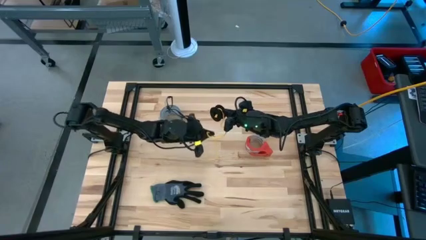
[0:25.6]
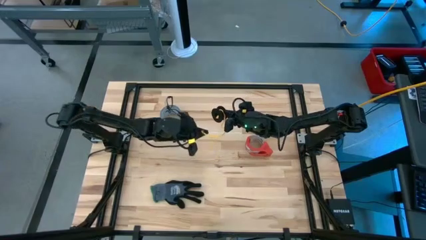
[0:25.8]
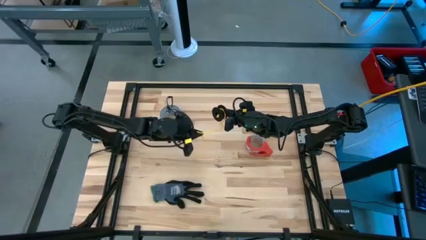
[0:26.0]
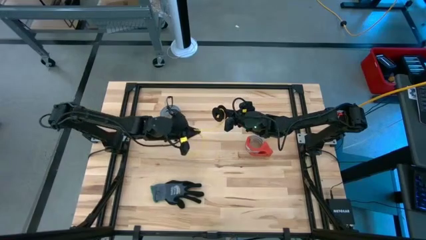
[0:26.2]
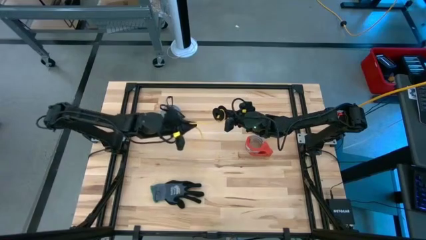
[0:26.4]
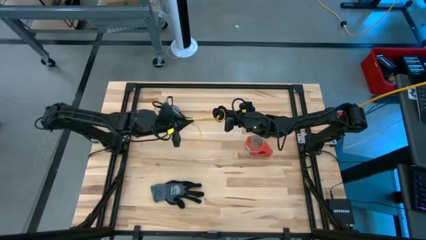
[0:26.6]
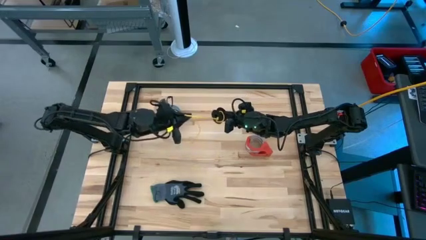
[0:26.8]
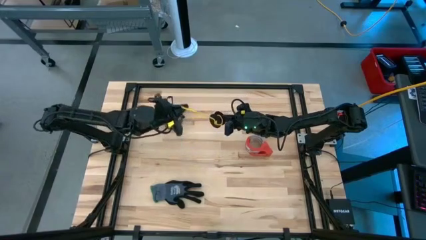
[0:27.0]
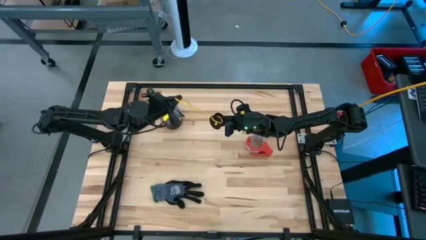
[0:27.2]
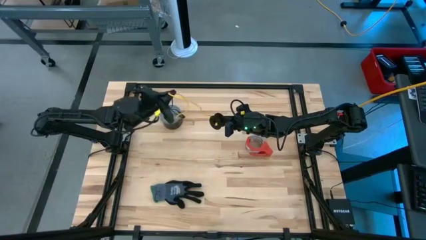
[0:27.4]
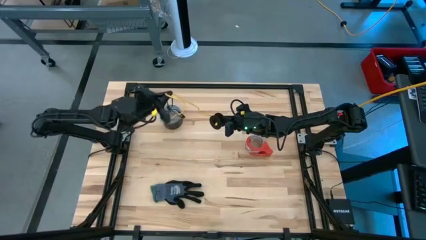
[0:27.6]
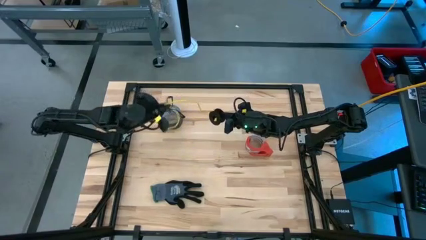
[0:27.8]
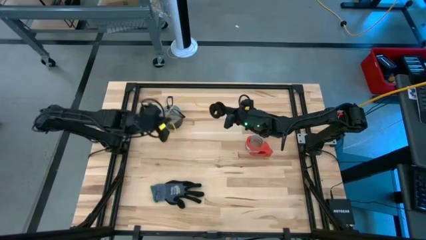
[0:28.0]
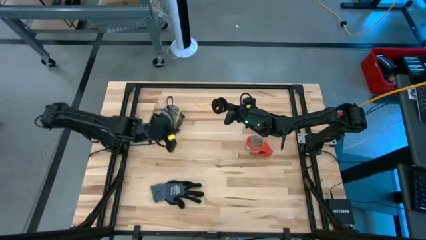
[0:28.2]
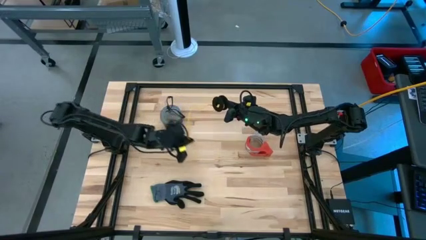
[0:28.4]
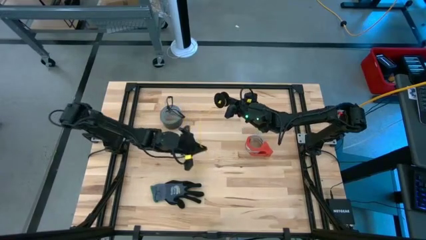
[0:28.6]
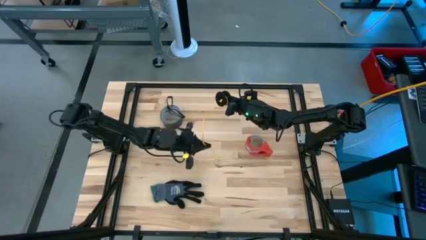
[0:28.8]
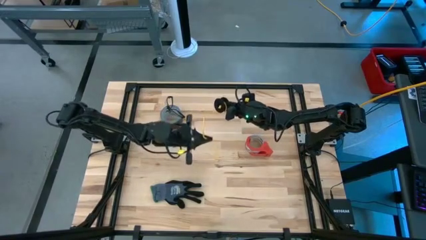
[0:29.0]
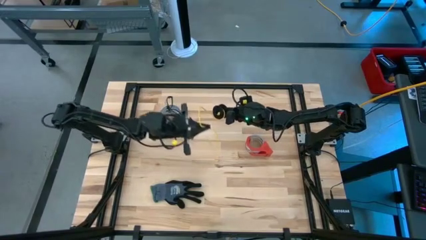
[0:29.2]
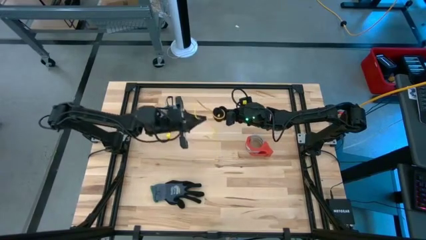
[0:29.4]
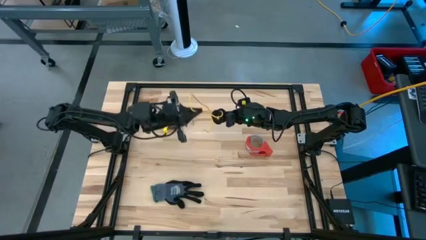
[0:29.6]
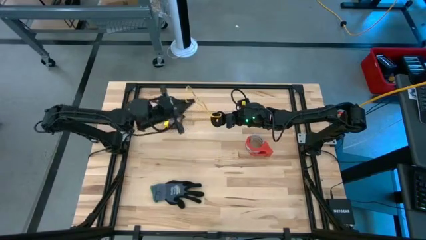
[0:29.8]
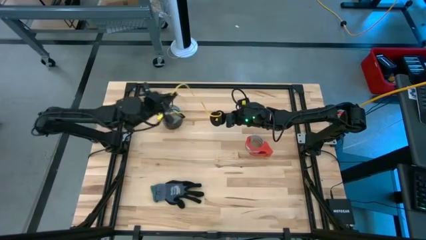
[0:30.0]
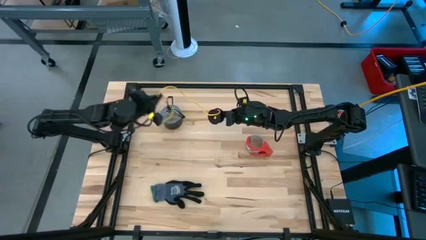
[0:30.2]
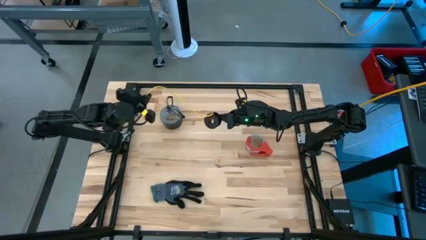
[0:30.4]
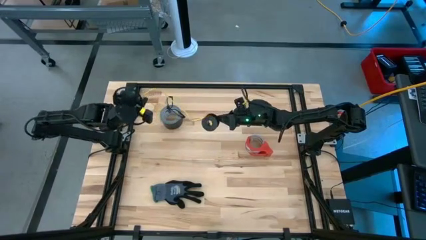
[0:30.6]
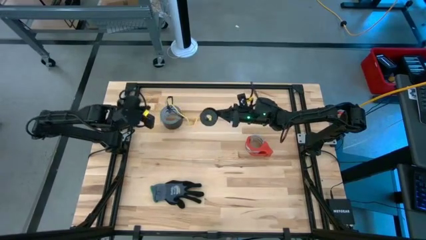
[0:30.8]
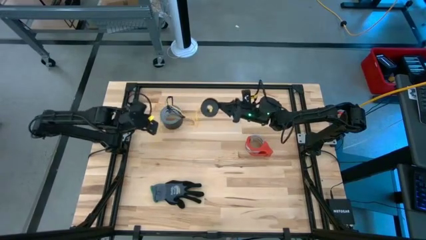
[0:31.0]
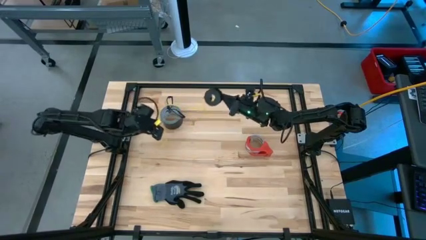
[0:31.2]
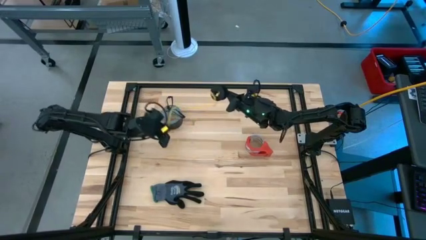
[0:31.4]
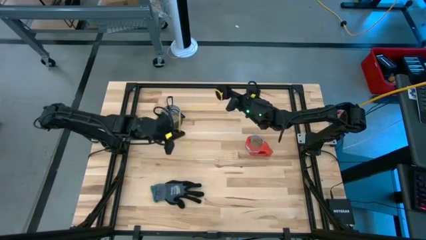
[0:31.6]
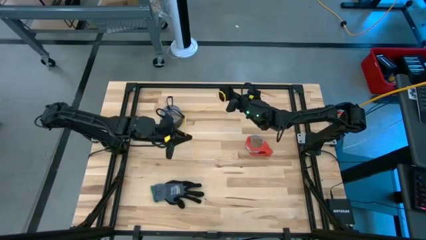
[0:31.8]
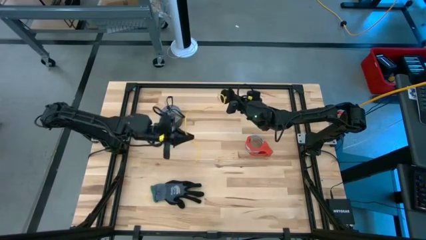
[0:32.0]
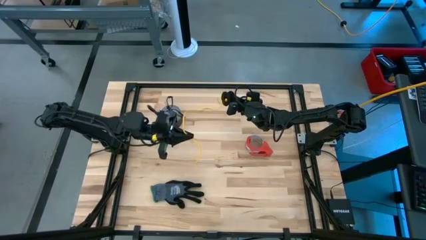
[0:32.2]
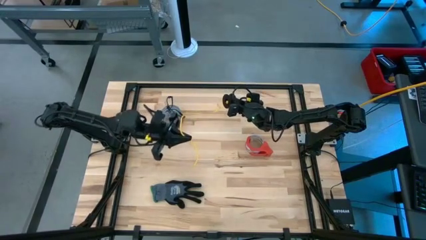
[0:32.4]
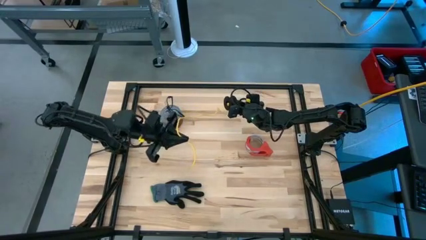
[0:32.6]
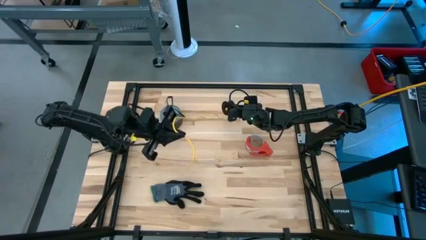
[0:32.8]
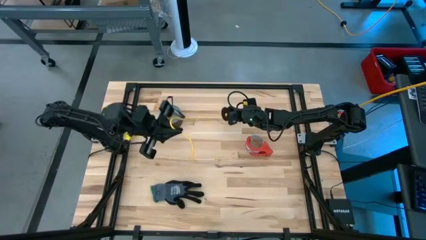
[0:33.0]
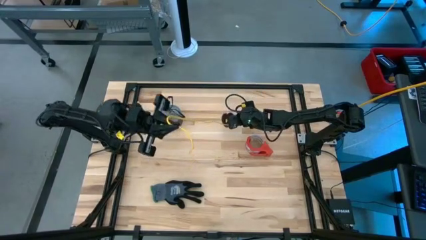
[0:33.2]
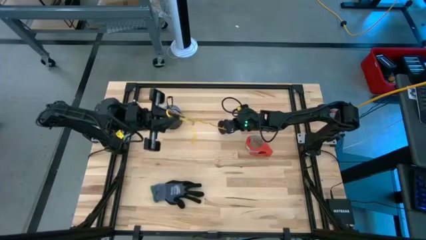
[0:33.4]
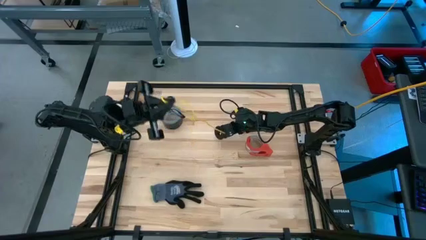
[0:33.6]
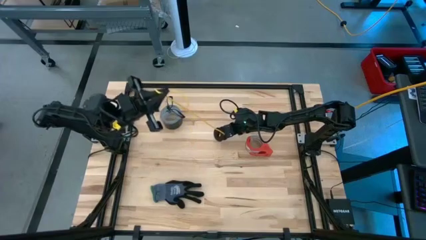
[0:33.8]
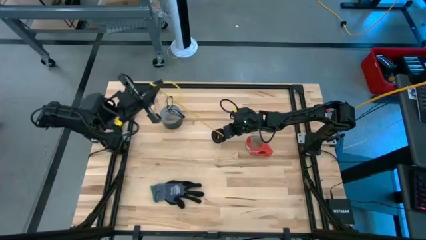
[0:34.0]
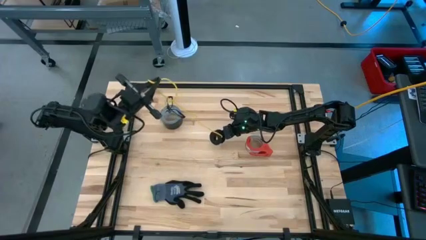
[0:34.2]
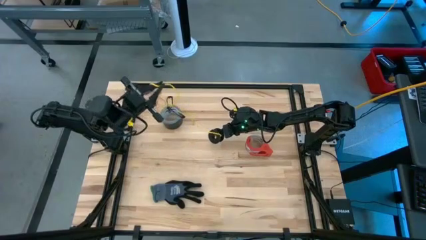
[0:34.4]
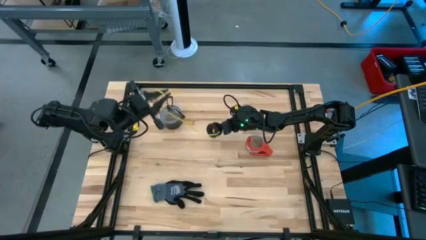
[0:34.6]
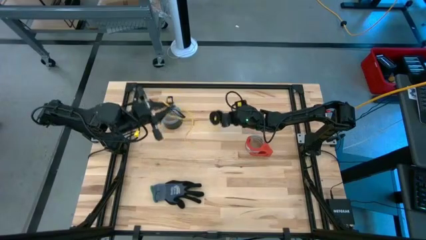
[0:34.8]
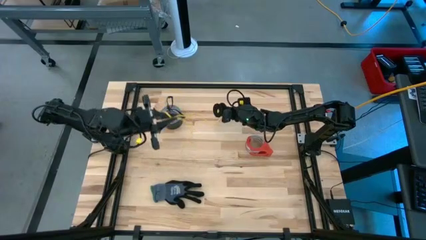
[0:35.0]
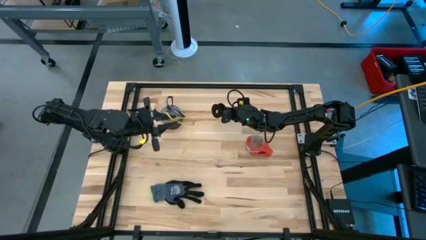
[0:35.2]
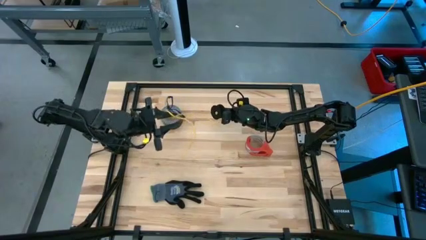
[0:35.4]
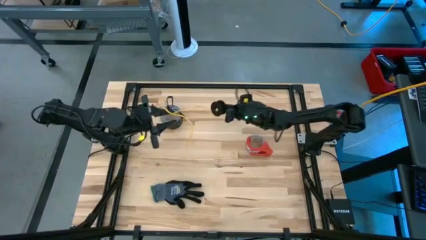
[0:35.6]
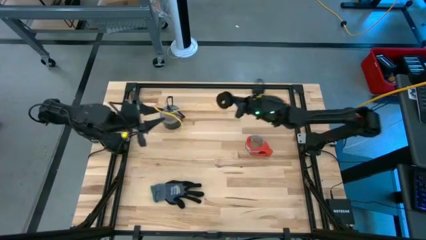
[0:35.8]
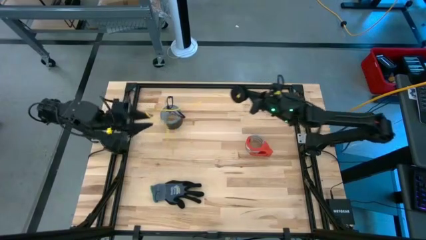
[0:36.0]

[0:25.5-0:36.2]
Task: Coil cords
Uncoil the yellow wire from the spool

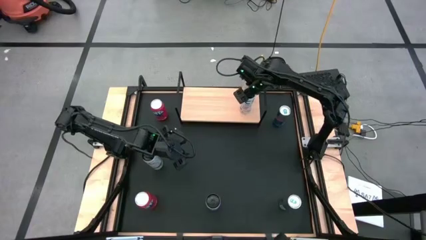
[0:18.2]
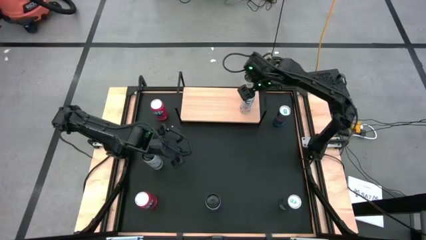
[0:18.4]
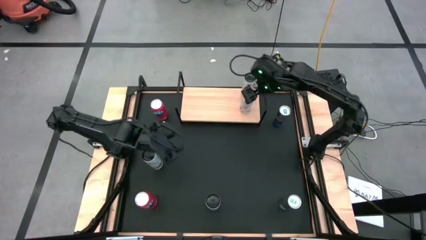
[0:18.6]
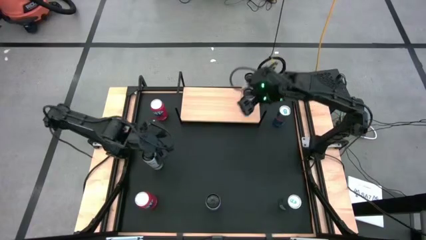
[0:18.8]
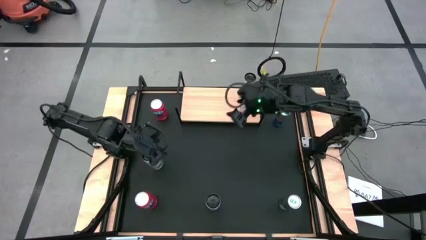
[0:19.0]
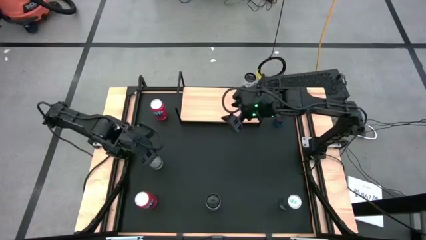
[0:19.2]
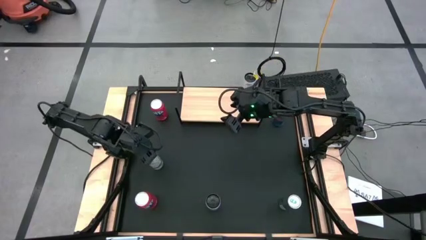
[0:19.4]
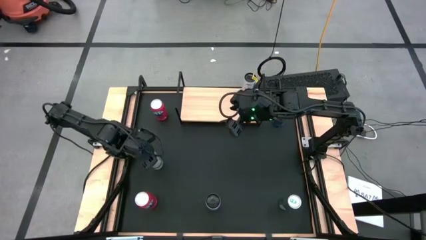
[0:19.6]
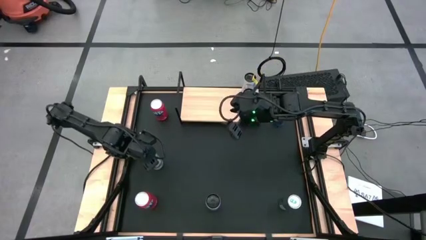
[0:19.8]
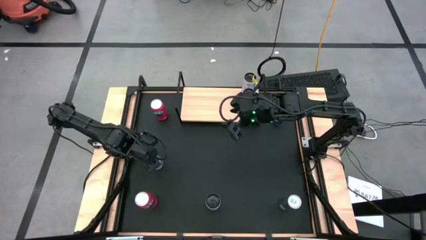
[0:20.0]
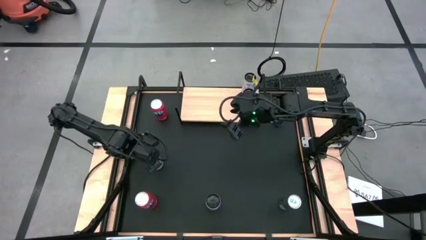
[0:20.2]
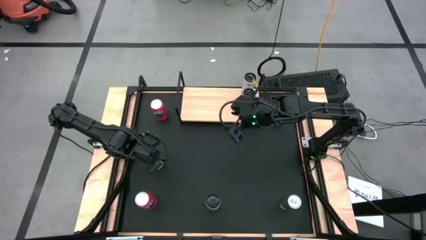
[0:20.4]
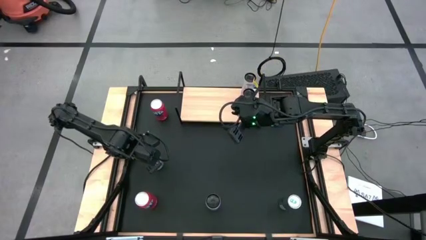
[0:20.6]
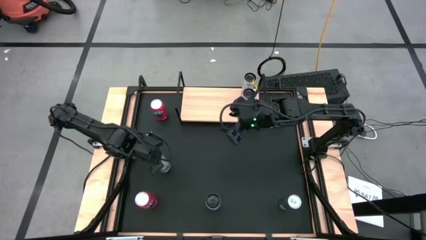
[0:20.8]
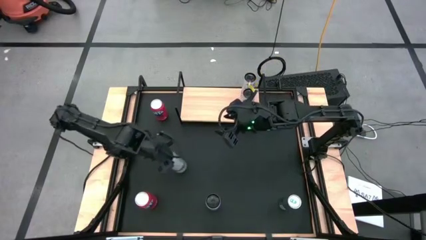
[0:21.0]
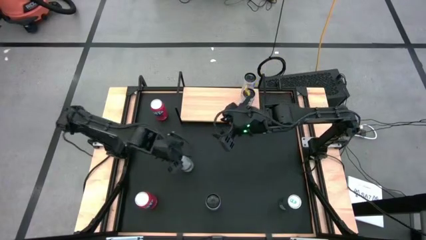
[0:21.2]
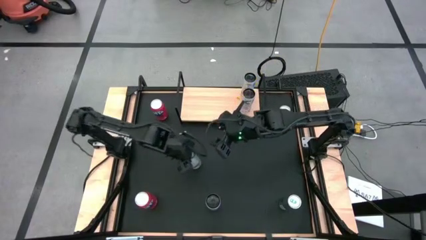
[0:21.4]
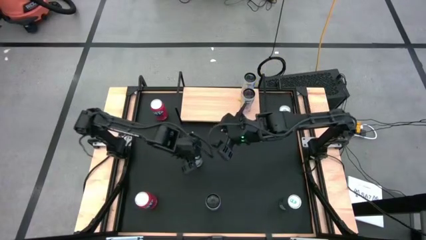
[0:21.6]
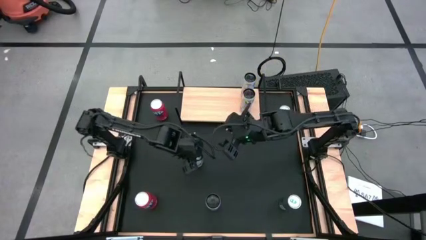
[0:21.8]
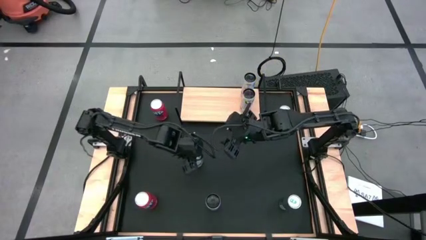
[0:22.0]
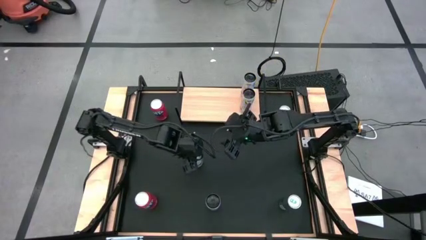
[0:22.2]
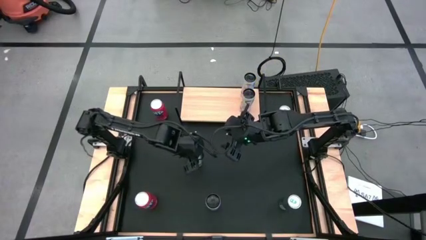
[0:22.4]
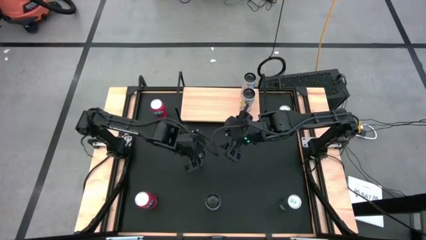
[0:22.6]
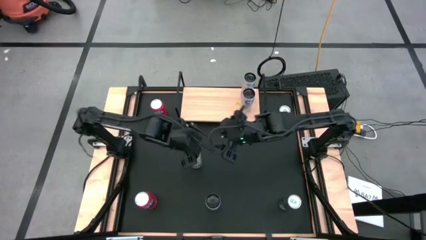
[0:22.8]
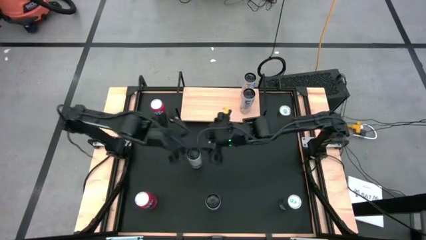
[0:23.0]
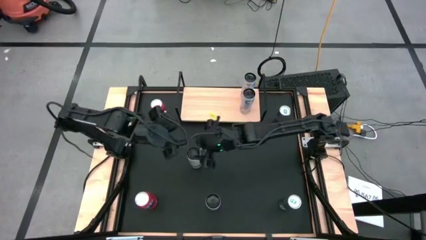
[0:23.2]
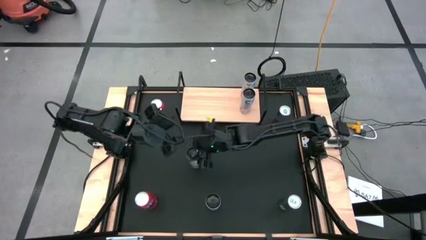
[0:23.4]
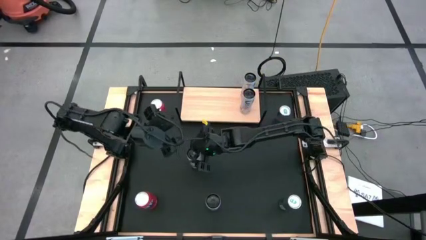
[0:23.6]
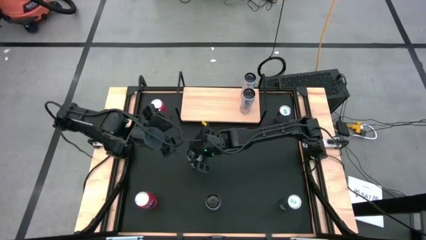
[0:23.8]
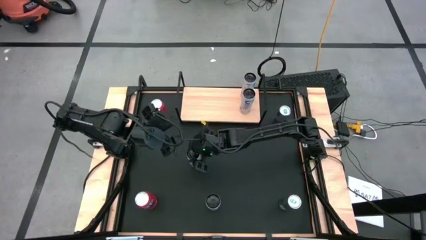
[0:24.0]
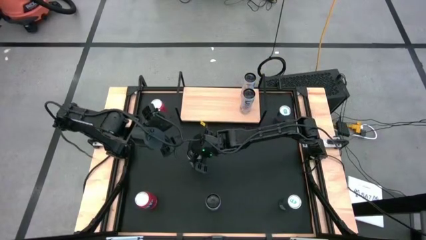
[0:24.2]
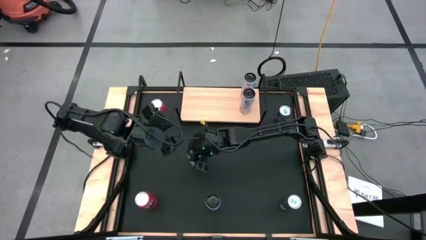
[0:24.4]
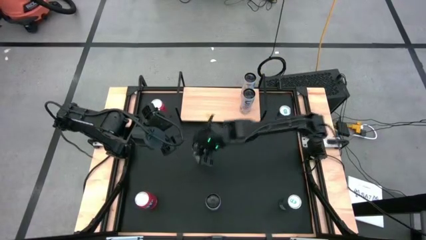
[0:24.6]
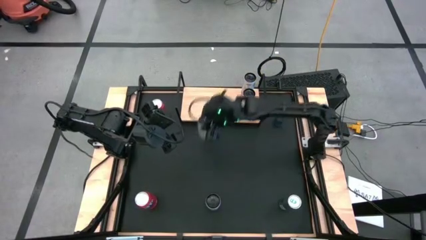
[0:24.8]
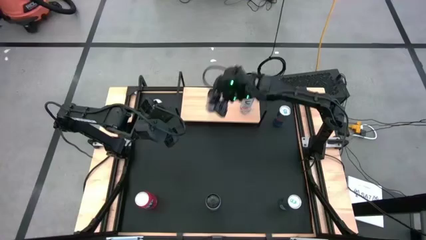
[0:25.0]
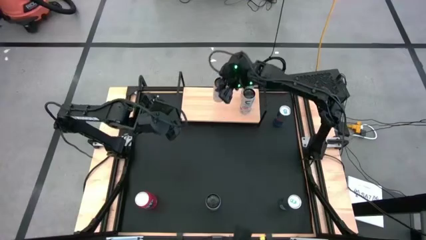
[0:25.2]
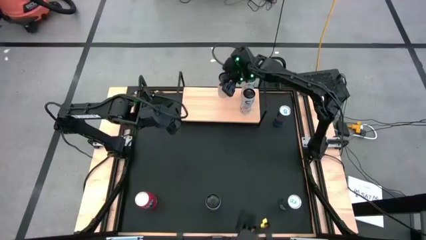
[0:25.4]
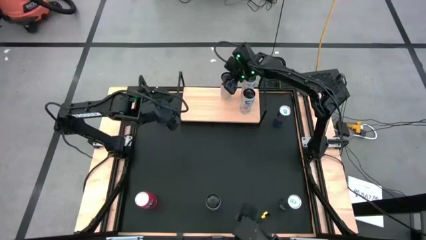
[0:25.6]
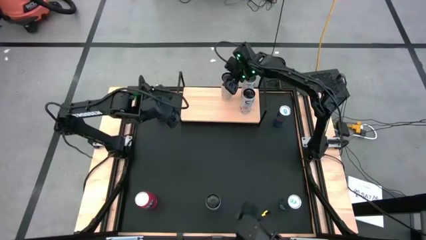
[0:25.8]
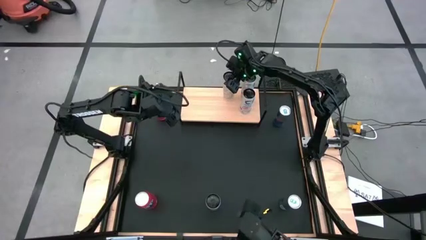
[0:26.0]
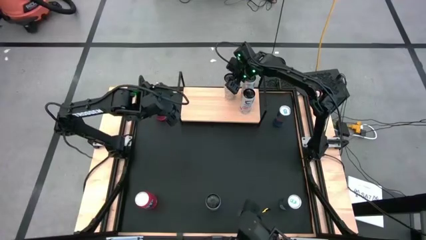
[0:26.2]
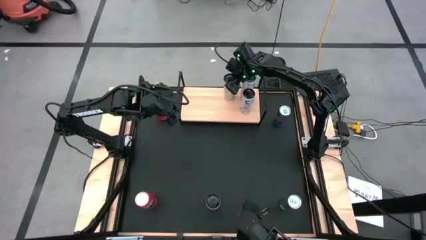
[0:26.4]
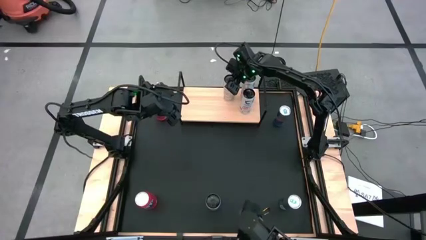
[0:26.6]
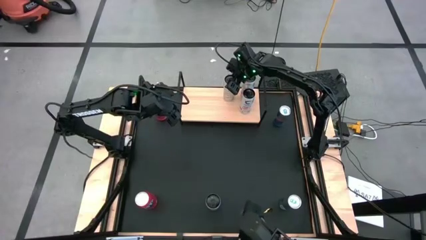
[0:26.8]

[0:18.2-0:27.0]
Task: Place canned beverage on shelf
Put the top white soda can on the shelf
